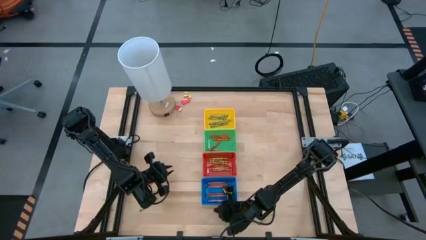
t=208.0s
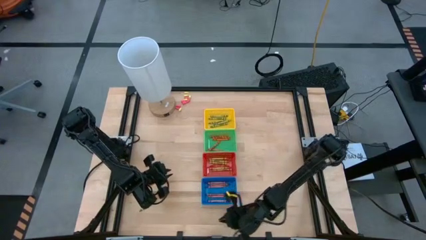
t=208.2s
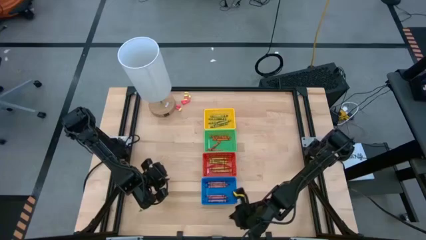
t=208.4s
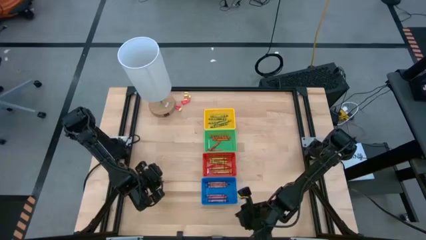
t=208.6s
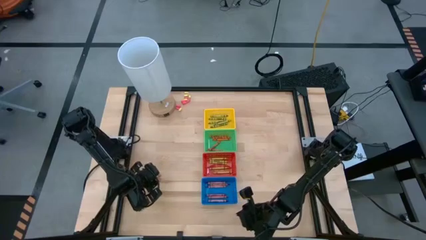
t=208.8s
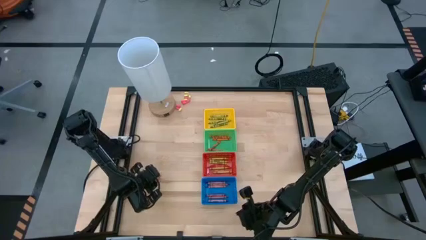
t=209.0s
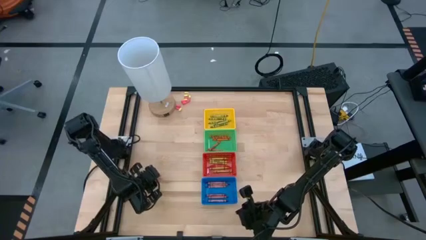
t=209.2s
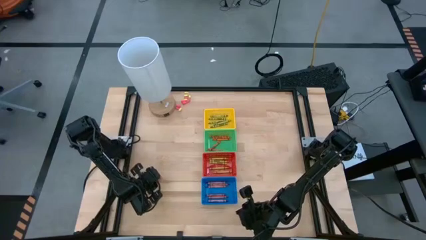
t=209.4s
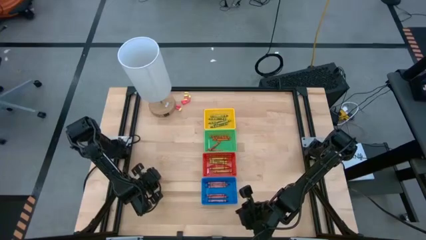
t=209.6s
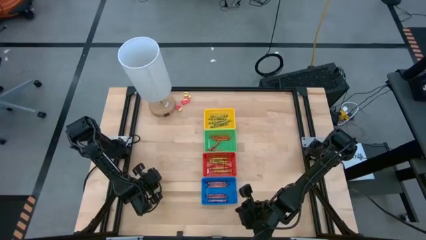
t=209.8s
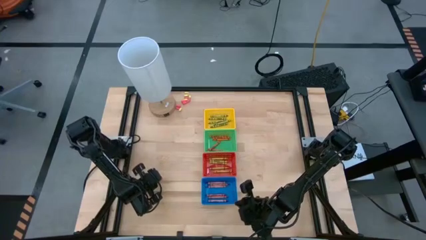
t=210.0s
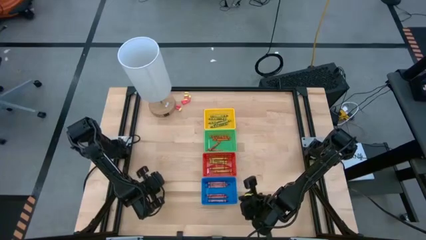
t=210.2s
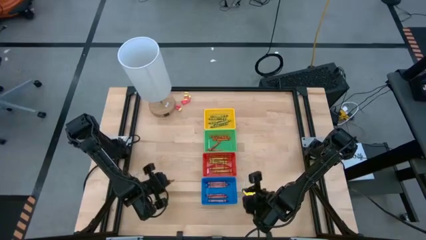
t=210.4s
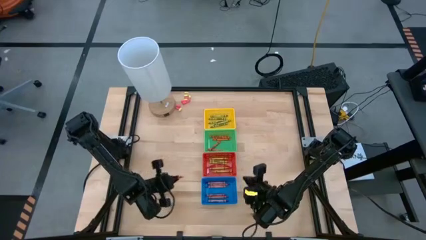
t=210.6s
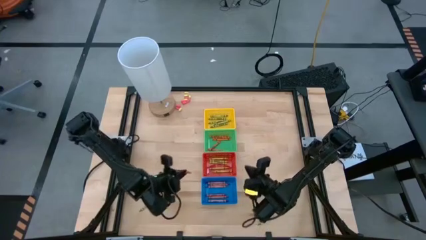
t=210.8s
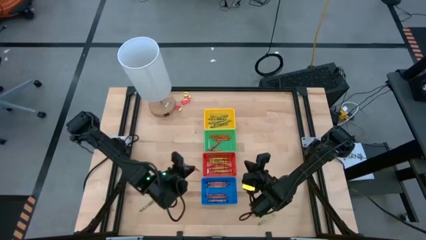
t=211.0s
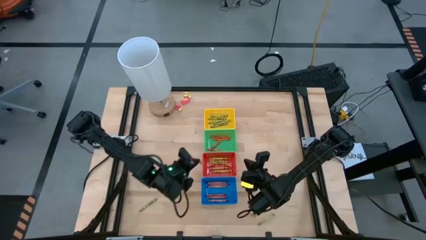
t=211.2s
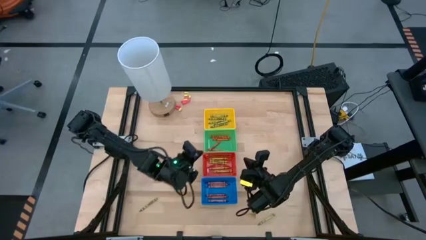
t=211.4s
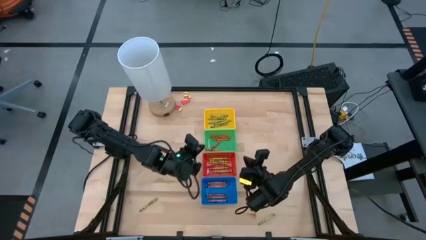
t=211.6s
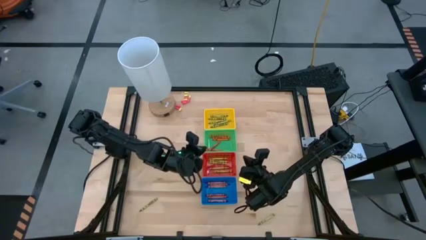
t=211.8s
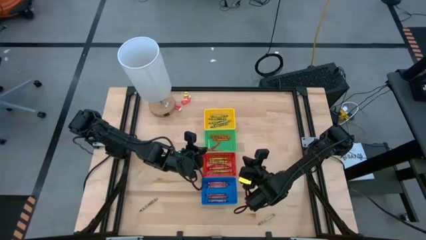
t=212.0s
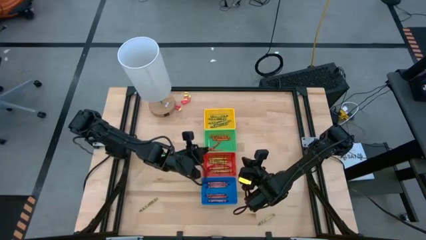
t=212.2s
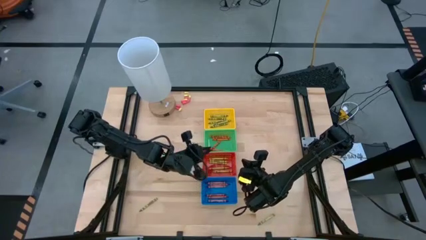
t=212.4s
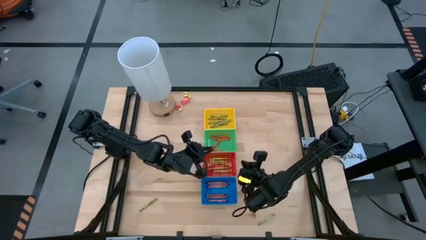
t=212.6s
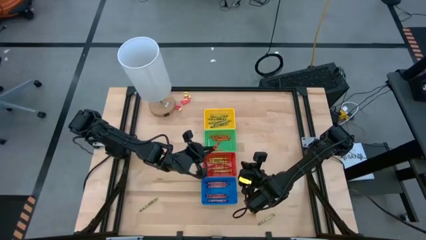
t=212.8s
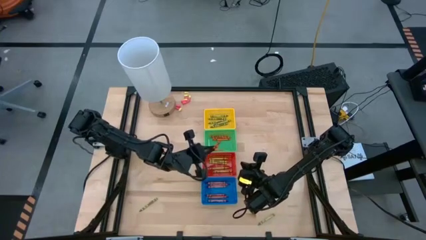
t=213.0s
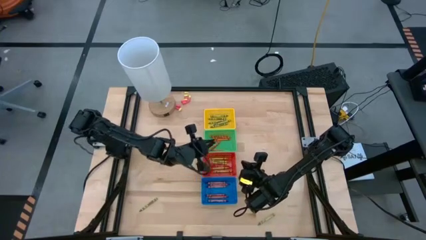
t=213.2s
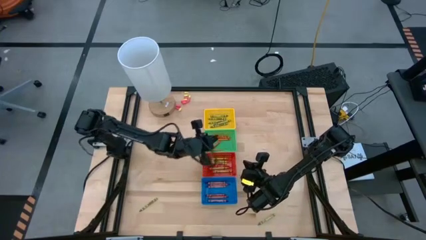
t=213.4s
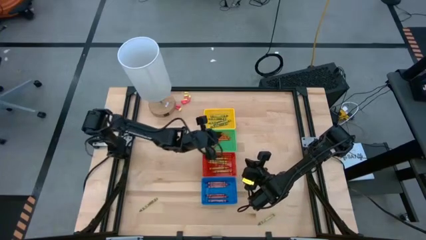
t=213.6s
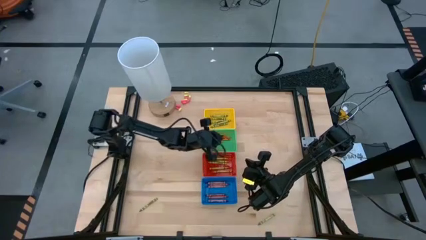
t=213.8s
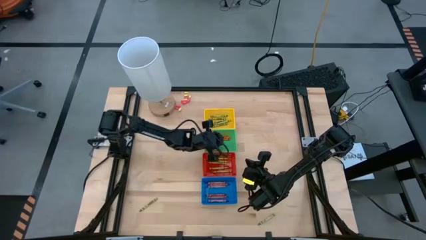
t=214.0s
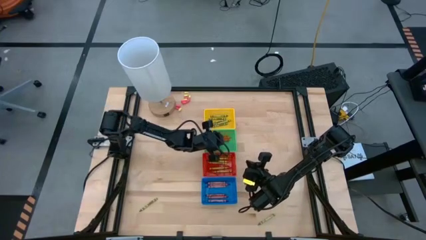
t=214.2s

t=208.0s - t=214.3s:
Task: Sort crayons
Put the orange crayon into the green bin

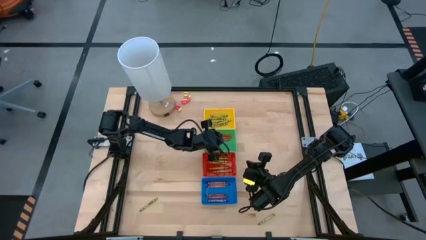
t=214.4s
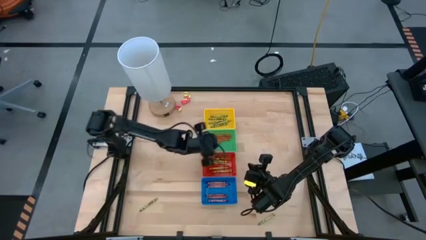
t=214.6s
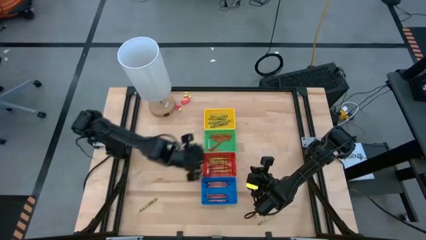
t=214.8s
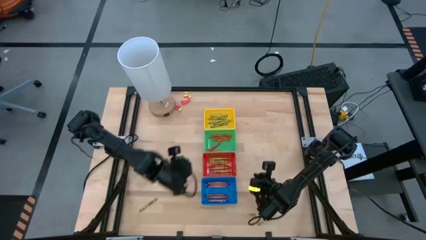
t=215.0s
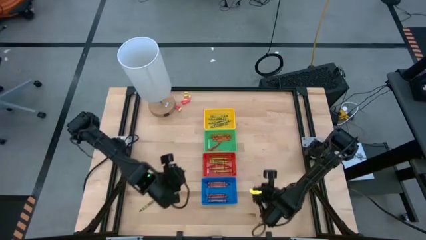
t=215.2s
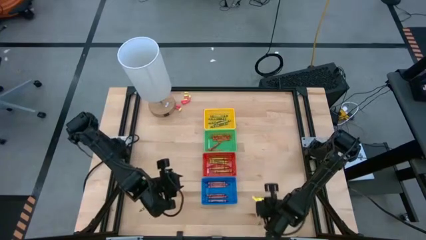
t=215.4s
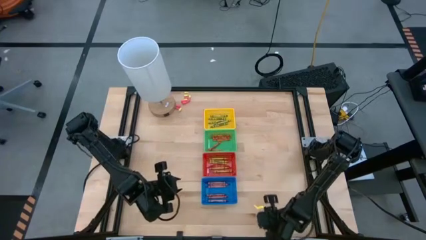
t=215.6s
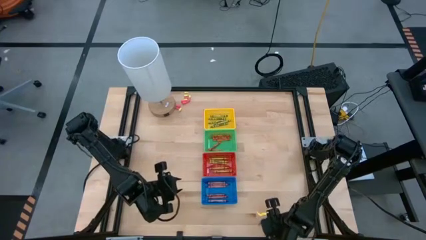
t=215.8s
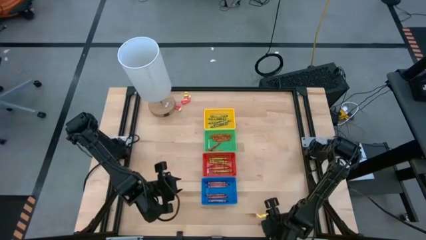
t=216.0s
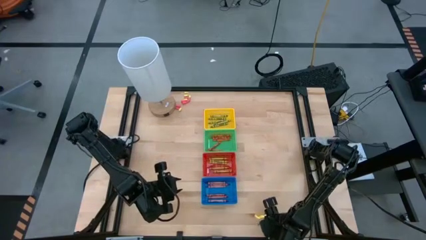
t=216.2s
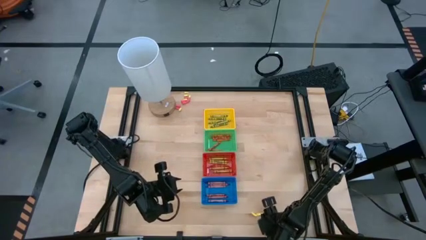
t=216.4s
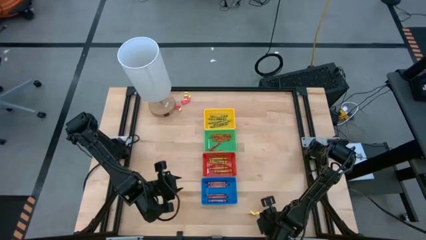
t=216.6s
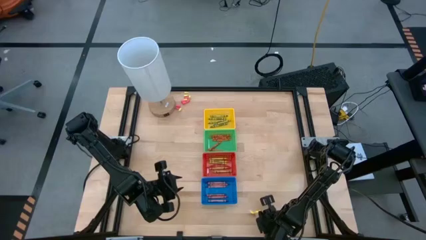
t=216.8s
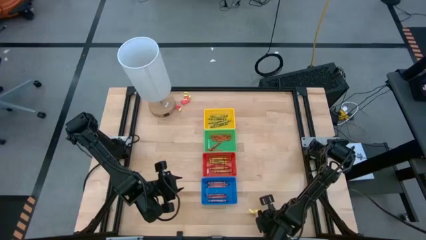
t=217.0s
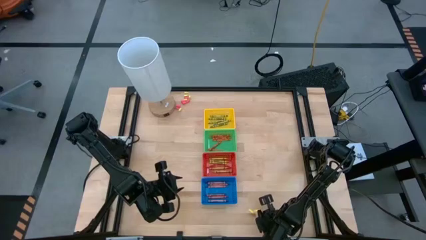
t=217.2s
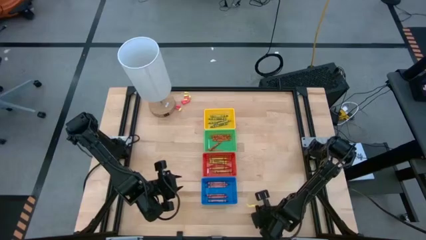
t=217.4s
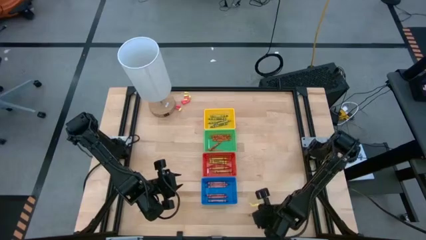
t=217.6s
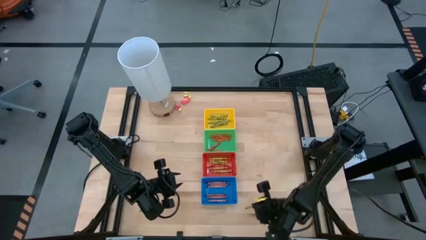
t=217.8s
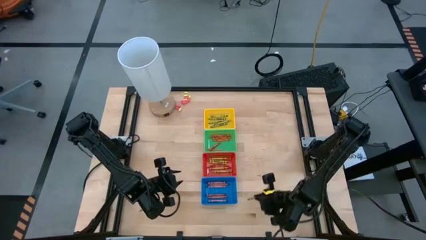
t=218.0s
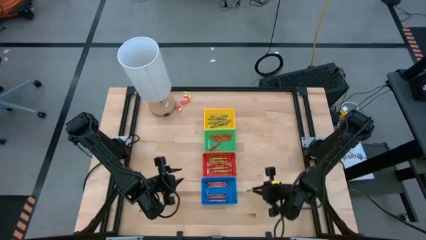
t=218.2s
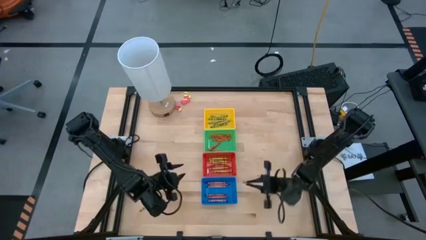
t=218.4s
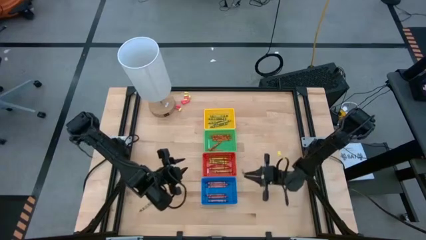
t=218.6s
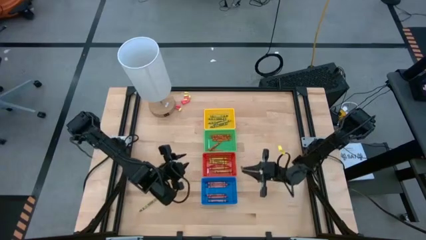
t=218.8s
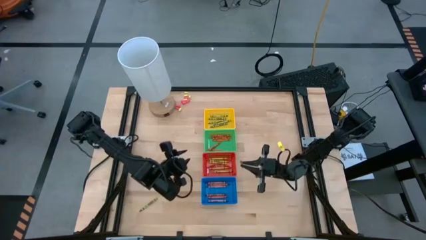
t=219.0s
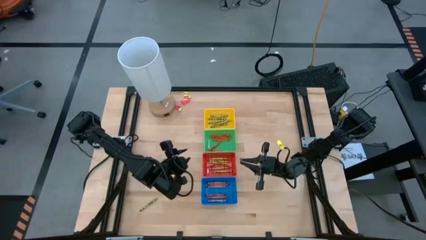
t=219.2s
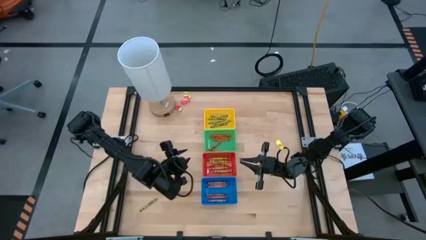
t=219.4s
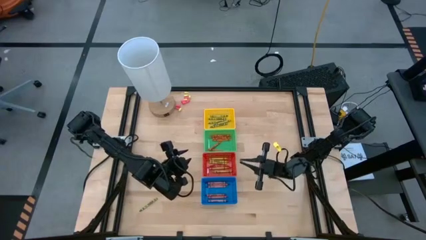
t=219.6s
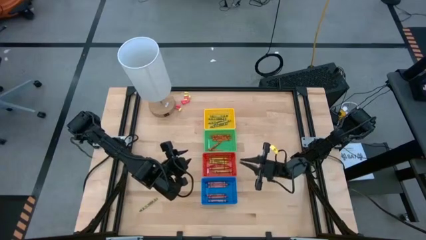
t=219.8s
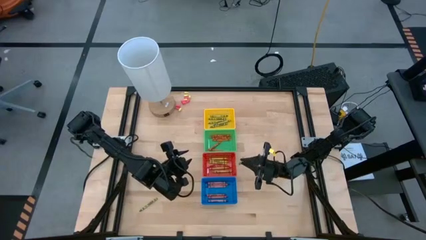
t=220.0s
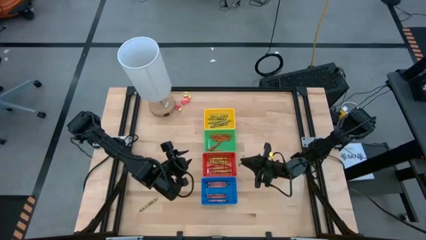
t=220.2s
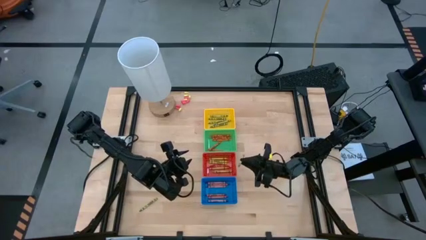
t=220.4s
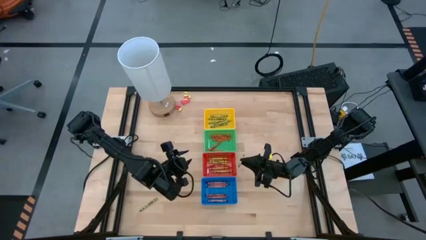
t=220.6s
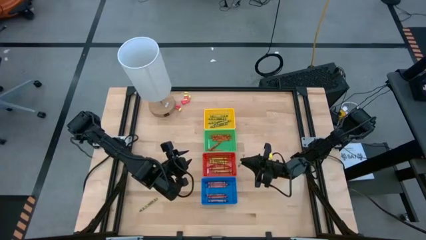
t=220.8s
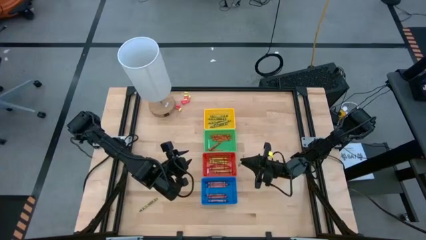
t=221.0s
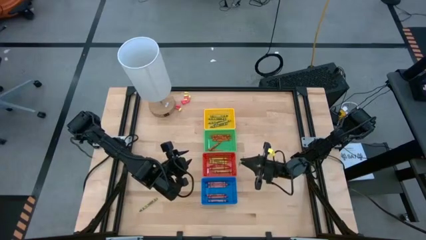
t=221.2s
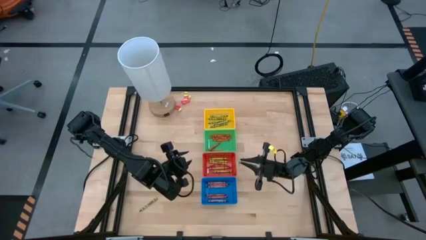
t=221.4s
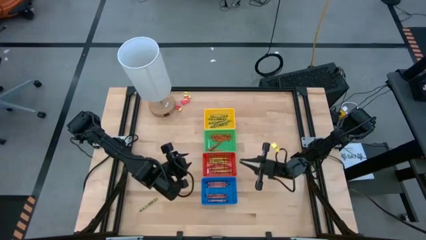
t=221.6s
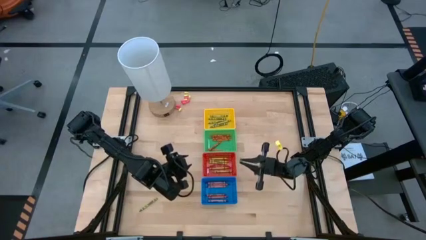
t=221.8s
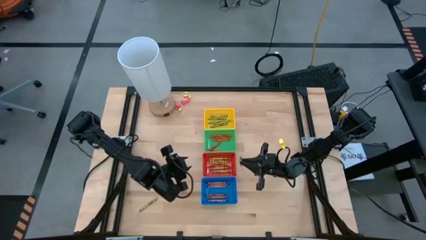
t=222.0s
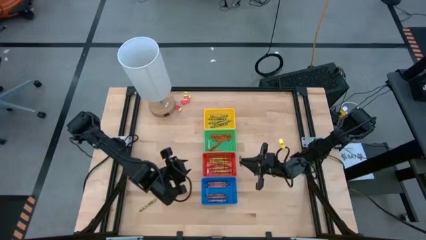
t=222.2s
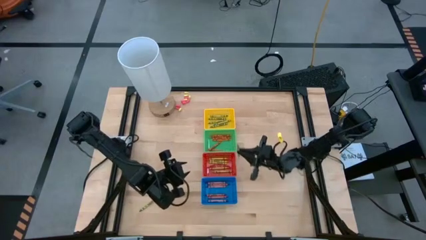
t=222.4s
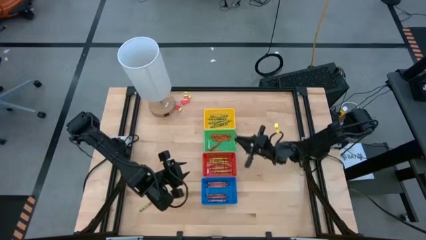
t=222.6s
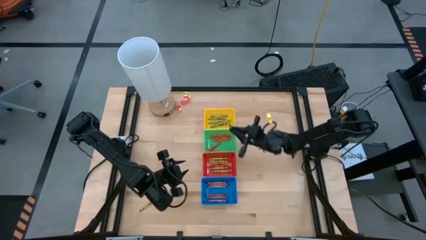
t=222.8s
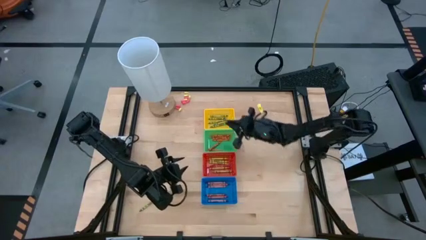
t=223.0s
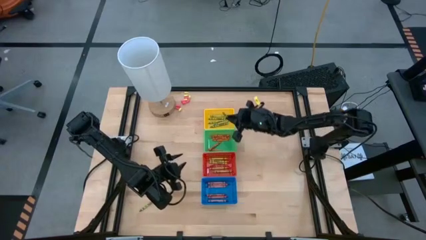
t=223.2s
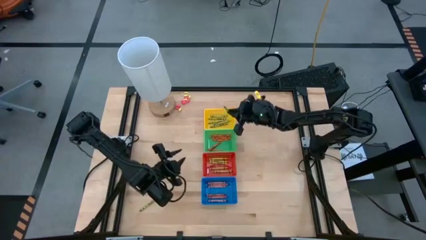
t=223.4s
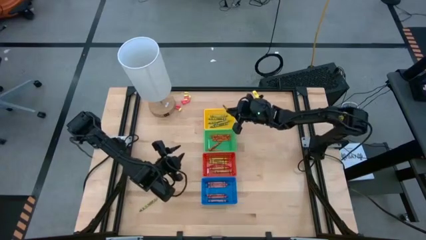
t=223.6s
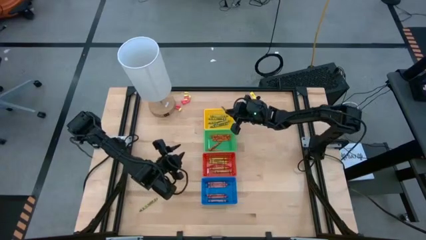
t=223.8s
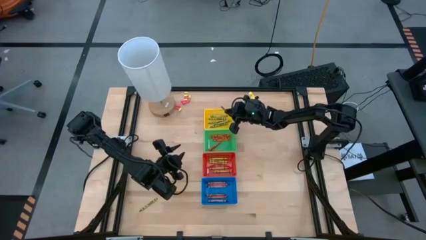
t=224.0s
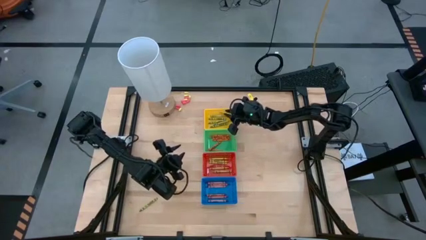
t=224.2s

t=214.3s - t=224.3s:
Put the green crayon into the yellow bin
